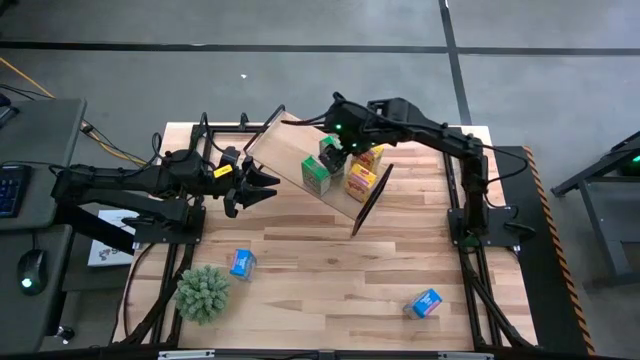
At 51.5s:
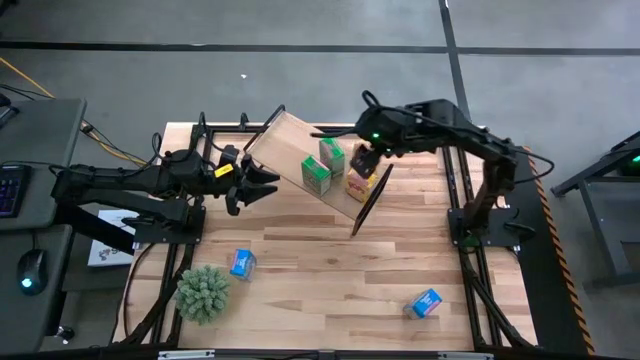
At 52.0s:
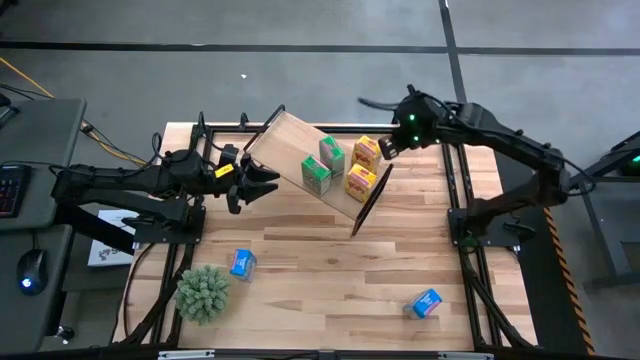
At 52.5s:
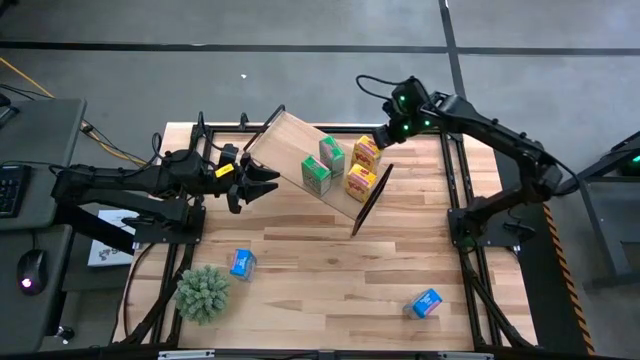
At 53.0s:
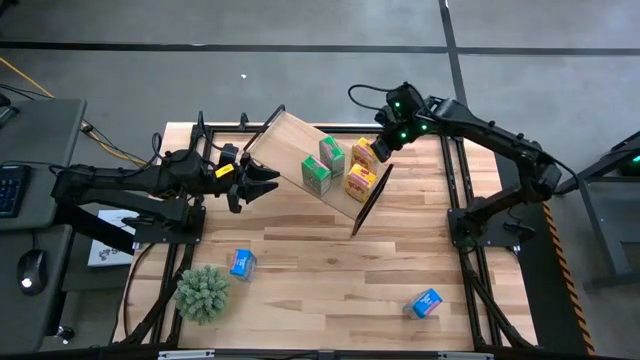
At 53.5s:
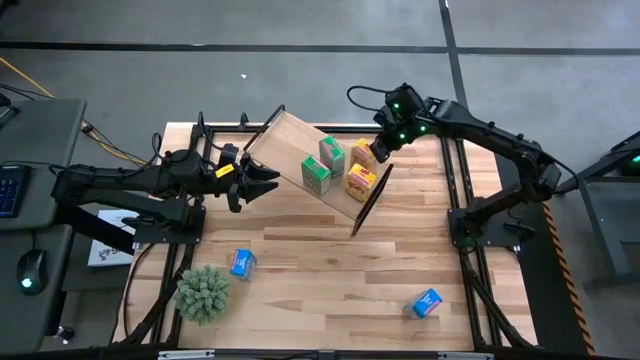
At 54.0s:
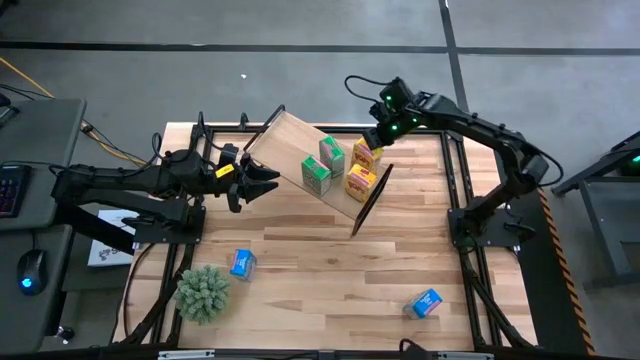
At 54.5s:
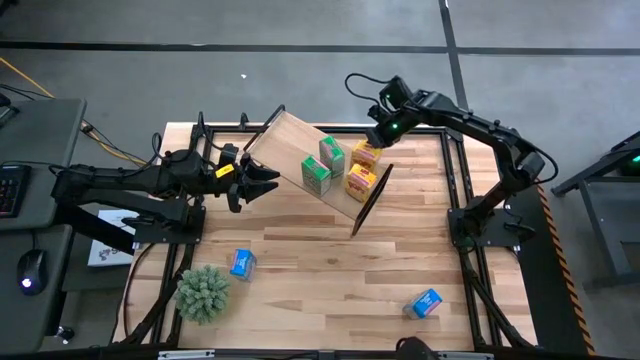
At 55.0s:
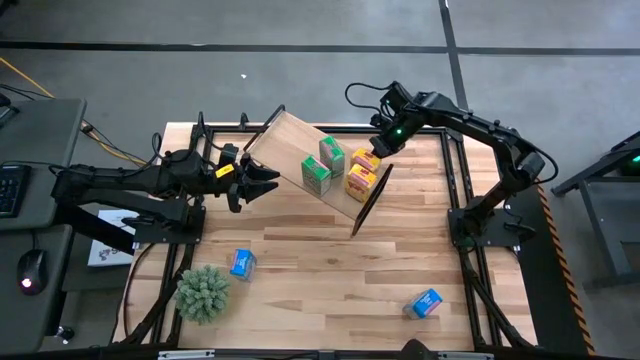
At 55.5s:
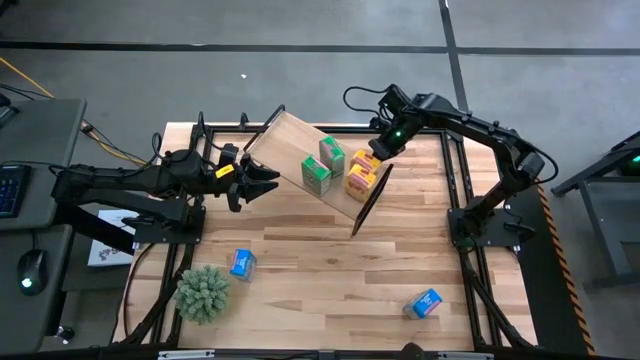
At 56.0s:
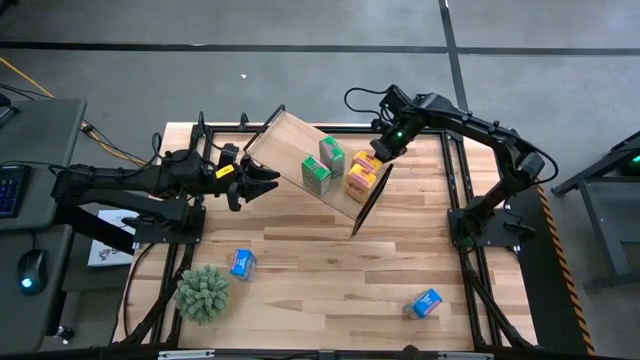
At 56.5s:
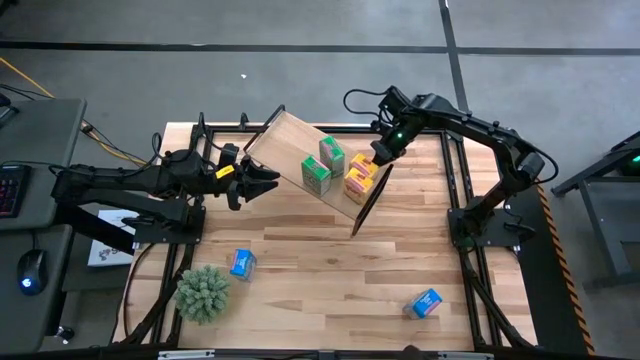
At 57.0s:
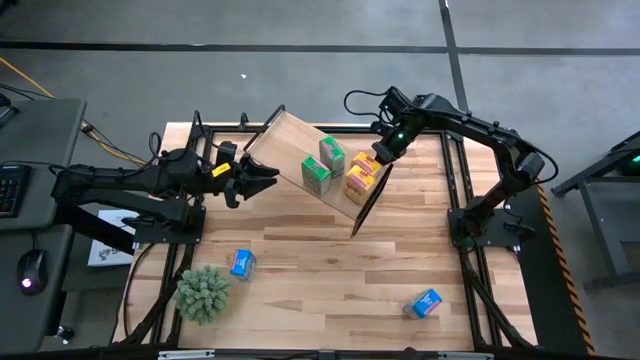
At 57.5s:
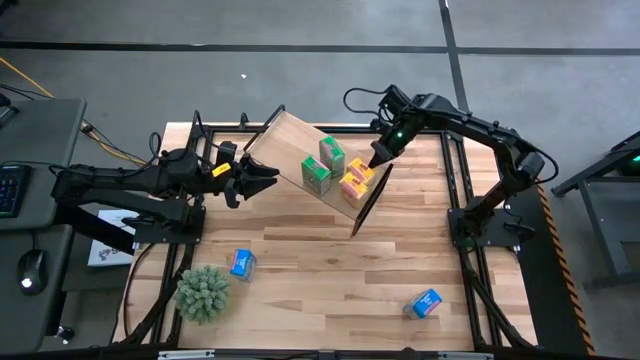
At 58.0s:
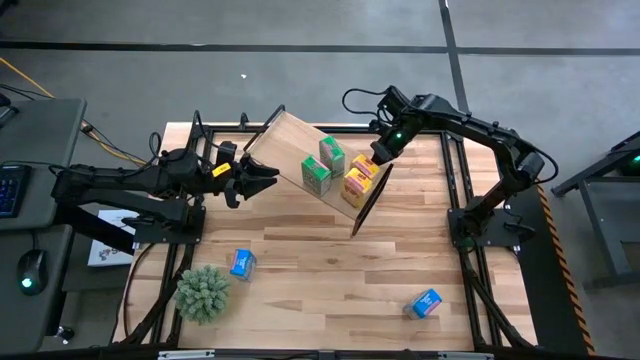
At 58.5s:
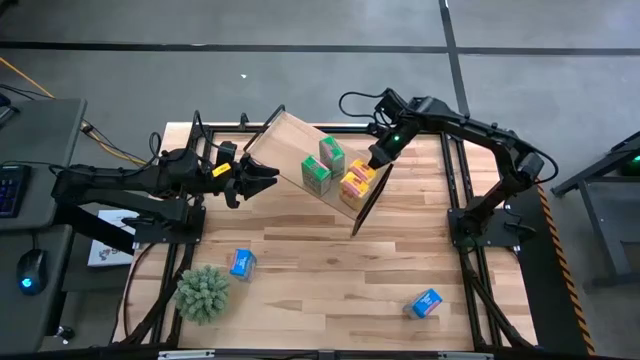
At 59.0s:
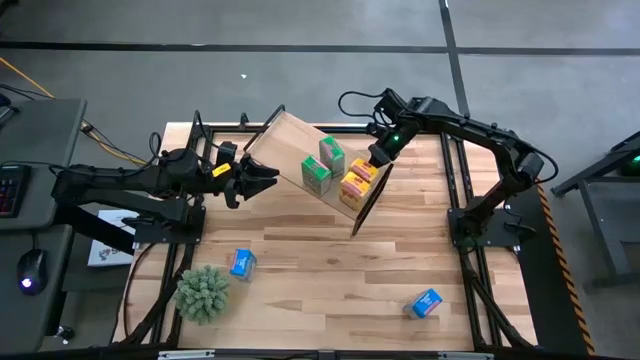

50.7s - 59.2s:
Task: Stack cereal on shelf
Adjust the yellow cereal box on the shelf

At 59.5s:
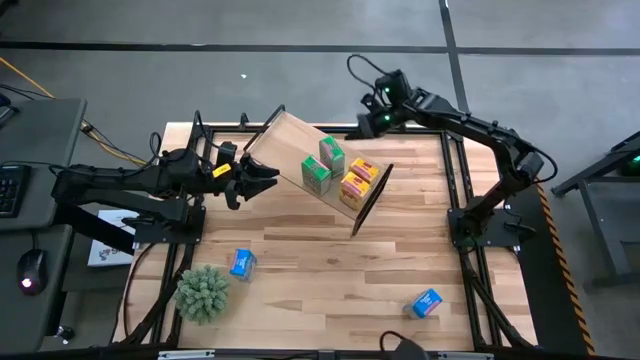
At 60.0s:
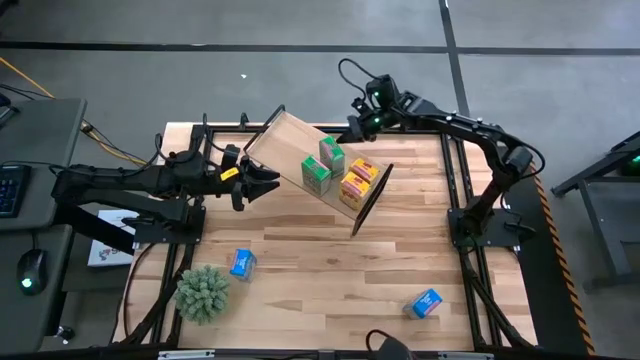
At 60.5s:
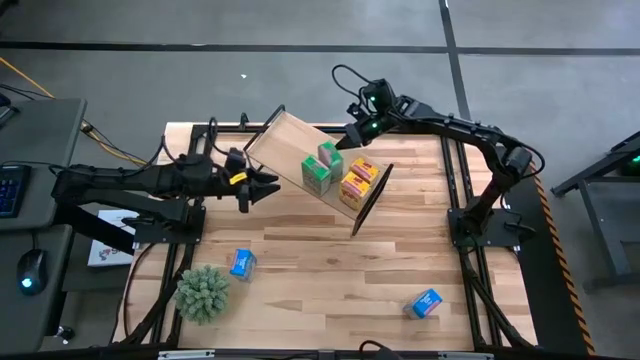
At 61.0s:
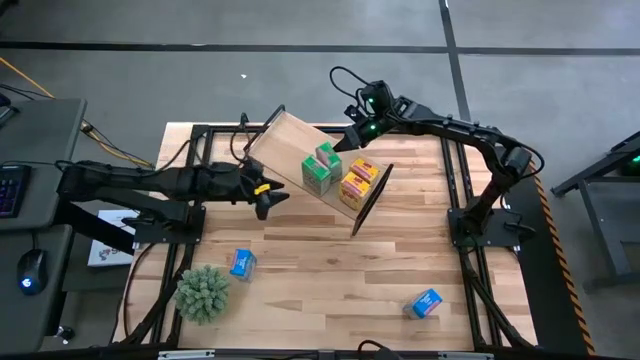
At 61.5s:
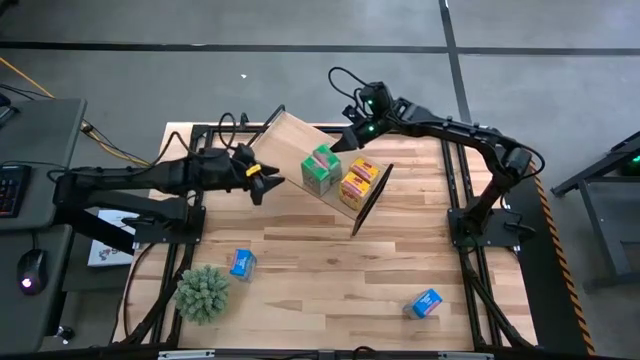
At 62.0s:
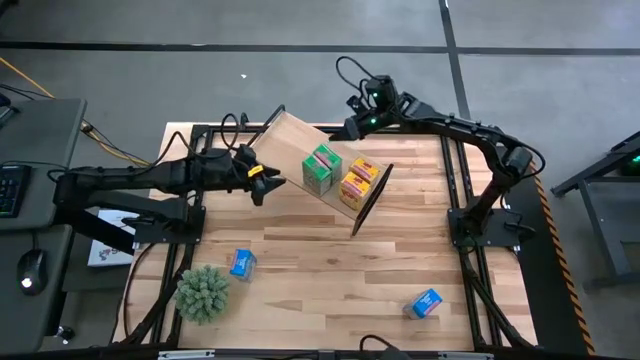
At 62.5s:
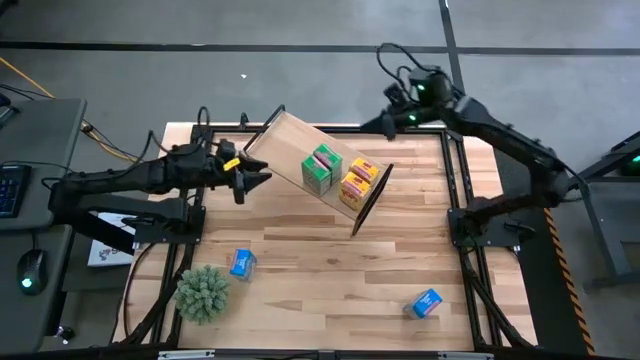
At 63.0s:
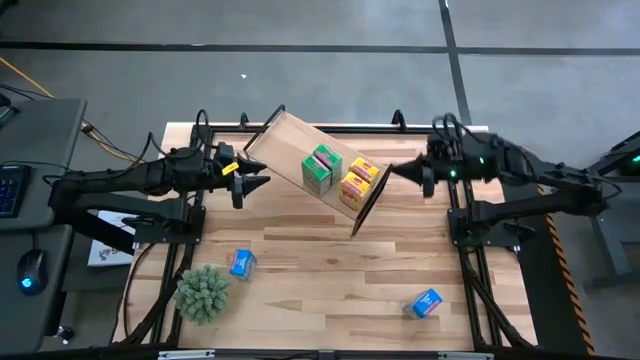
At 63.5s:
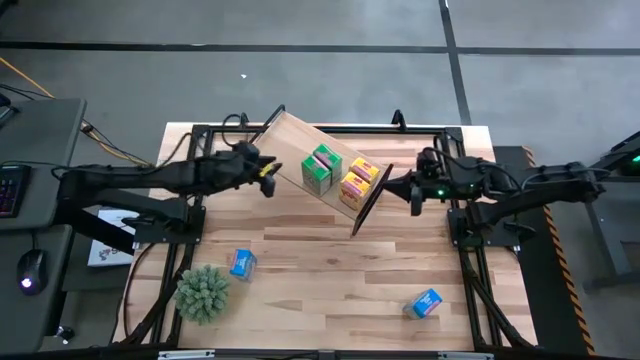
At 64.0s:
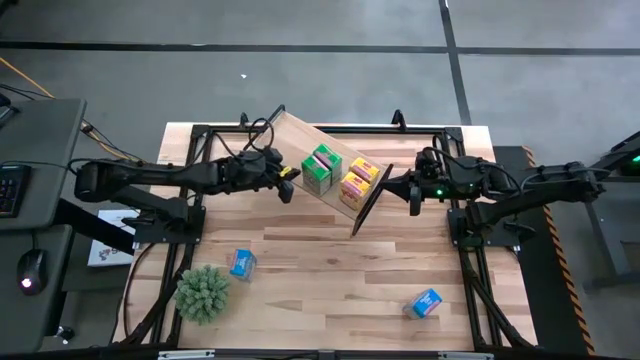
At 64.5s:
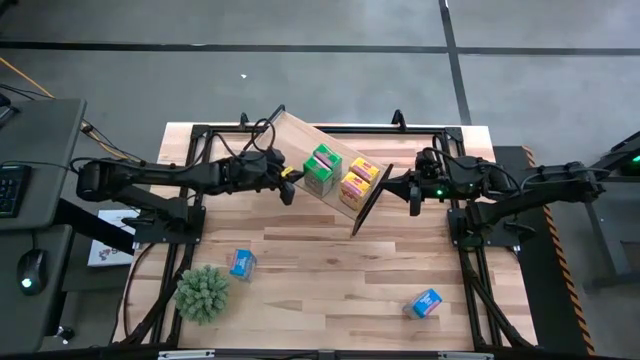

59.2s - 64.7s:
Adjust the green cereal box on the shelf

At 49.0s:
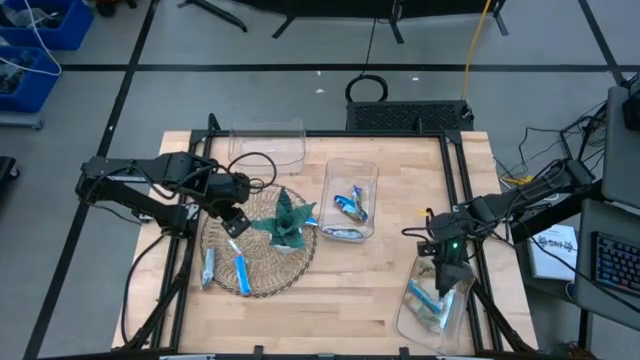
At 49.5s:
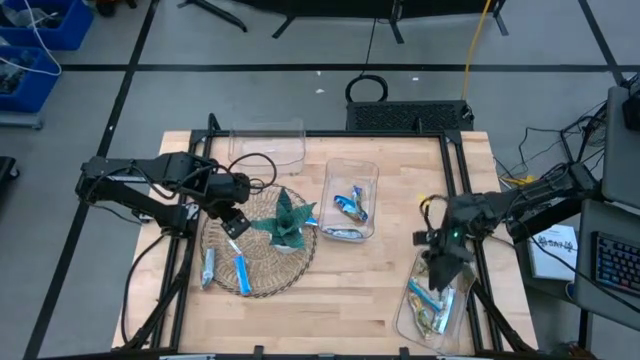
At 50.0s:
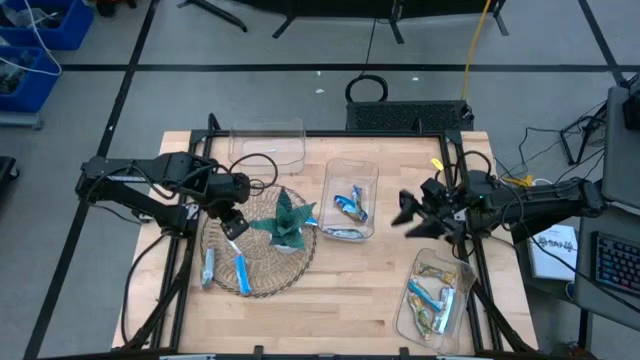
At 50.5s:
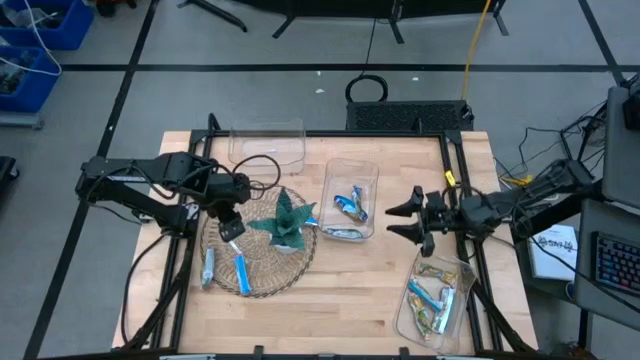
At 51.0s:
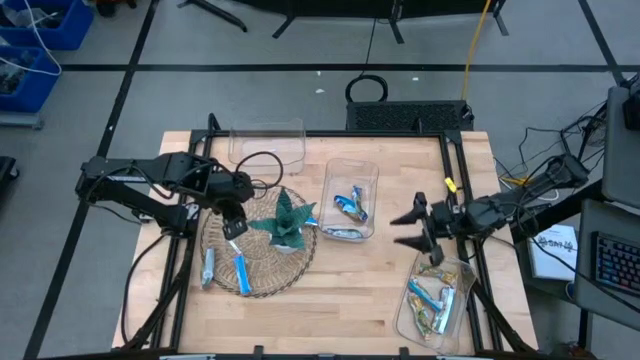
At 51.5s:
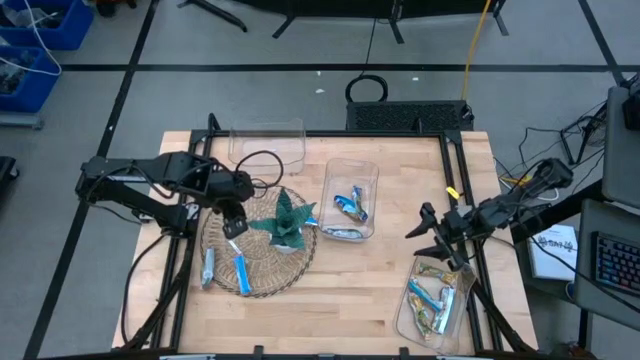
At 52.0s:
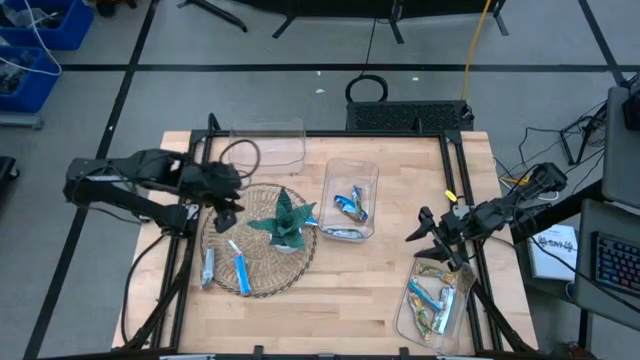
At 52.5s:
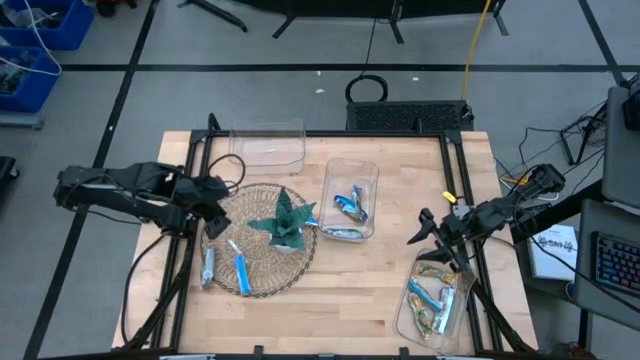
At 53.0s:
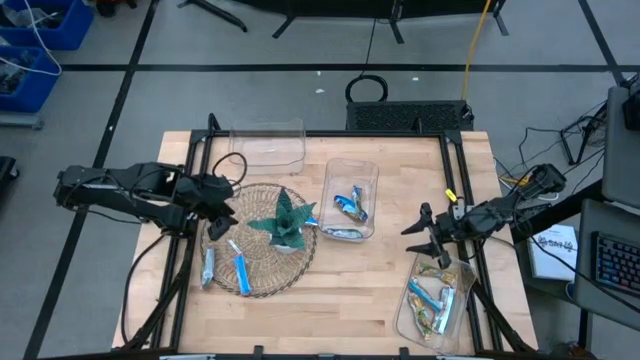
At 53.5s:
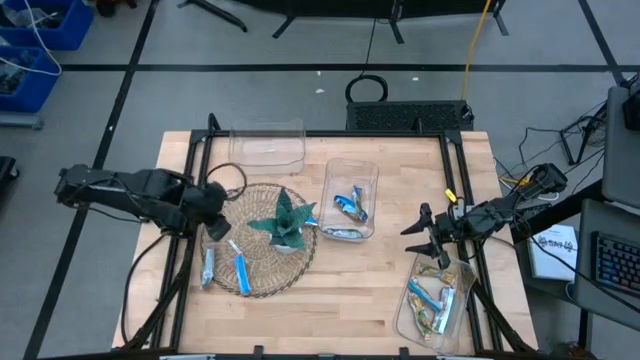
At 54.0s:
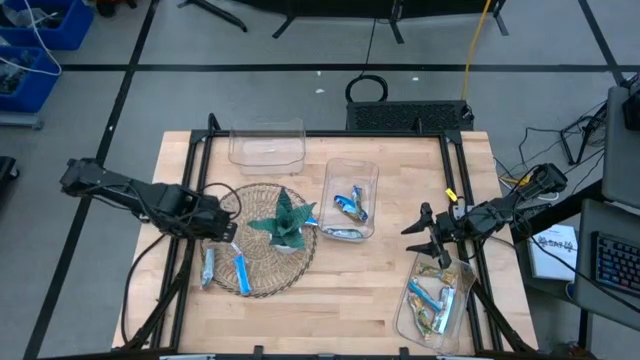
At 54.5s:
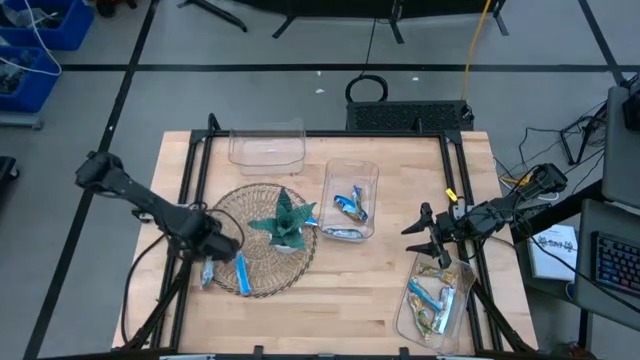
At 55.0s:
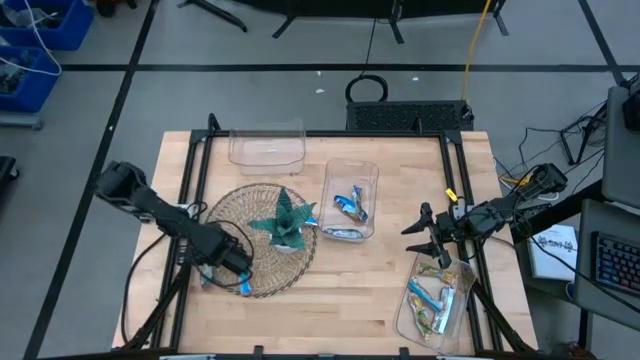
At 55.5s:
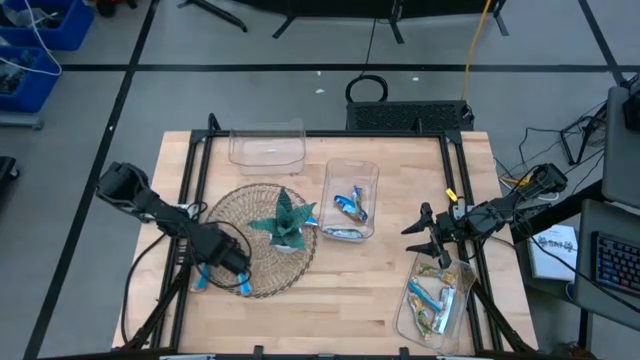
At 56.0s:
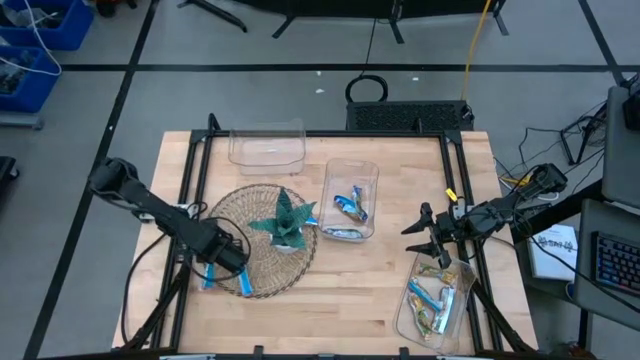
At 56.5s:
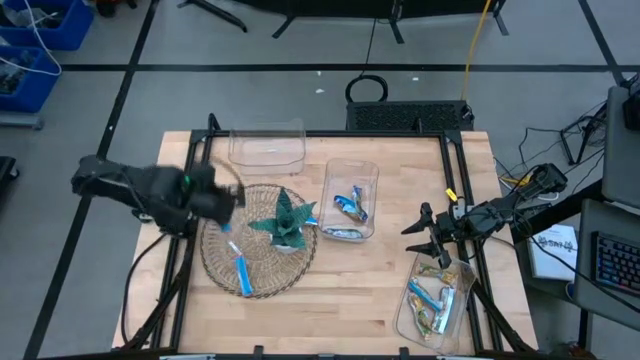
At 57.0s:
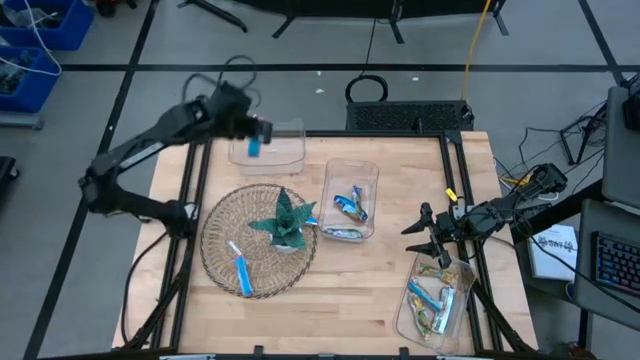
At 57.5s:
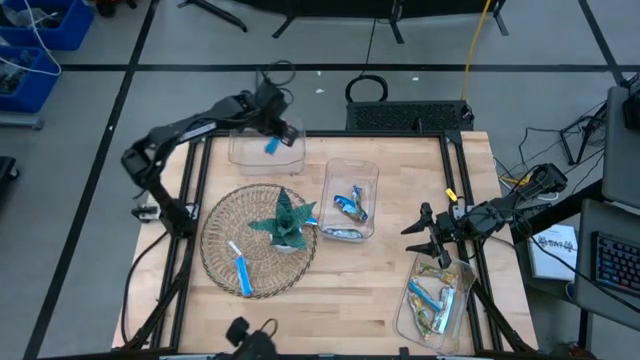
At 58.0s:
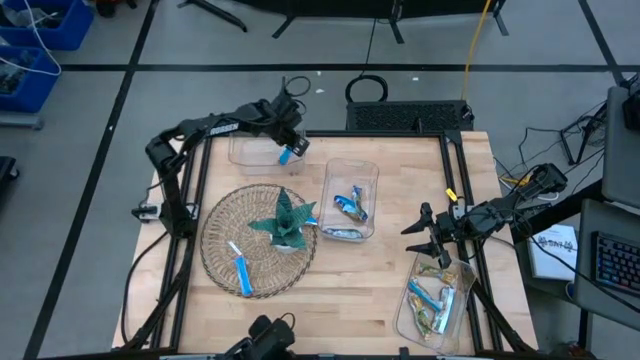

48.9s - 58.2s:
Task: Pick and place Granola Bars by type
Put the red granola bar into the top transparent bin
